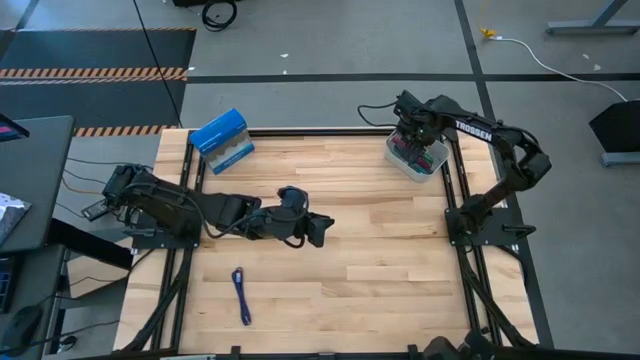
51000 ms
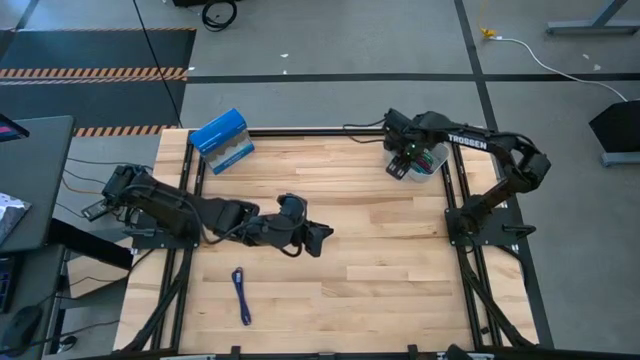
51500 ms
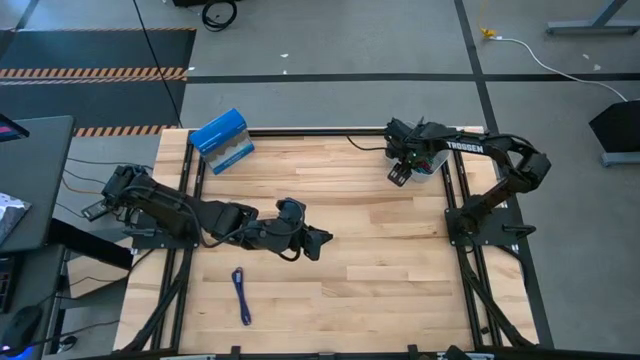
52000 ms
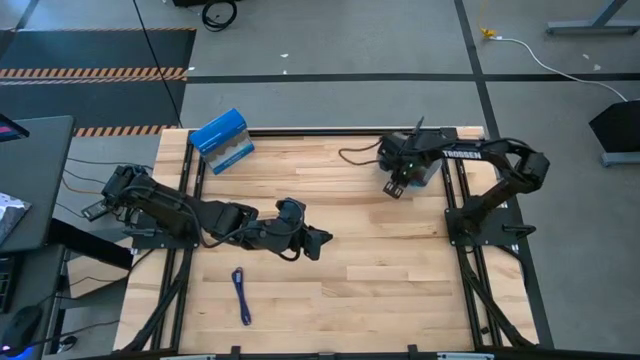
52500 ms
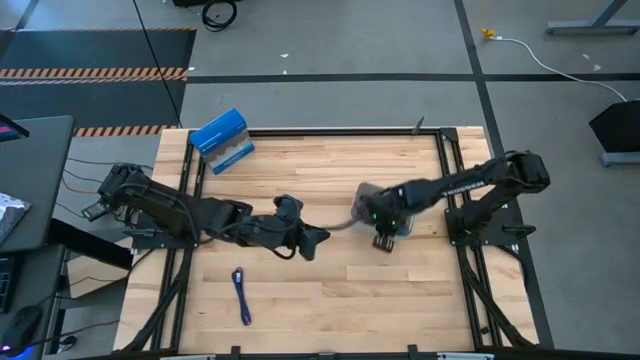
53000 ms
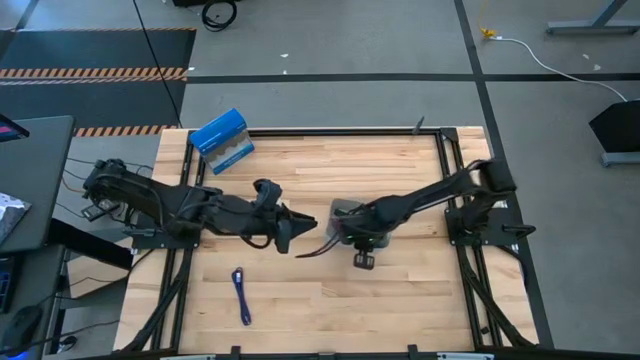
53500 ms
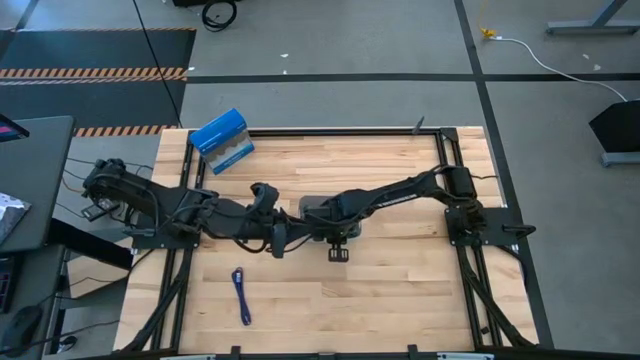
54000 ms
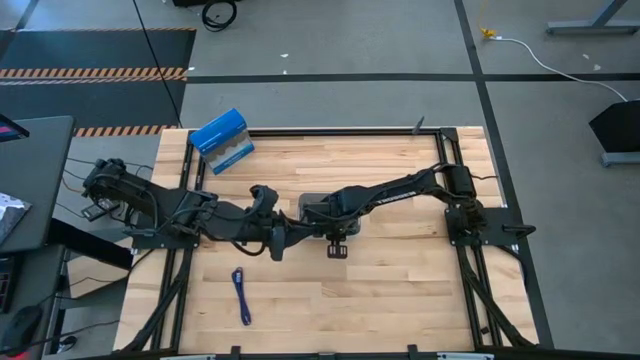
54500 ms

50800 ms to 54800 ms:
Task: Pick and place USB-C Cables
Move the bin to the center of the table

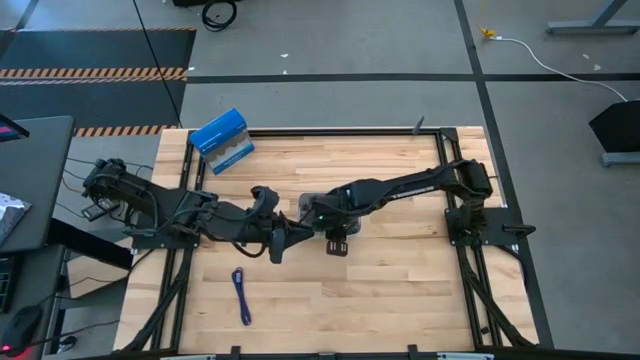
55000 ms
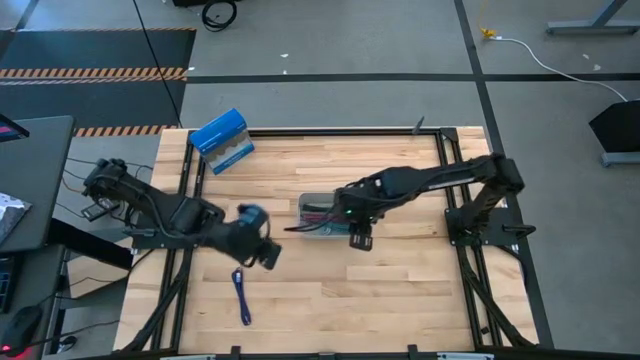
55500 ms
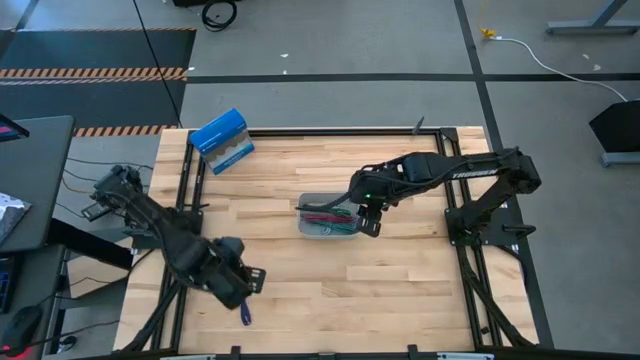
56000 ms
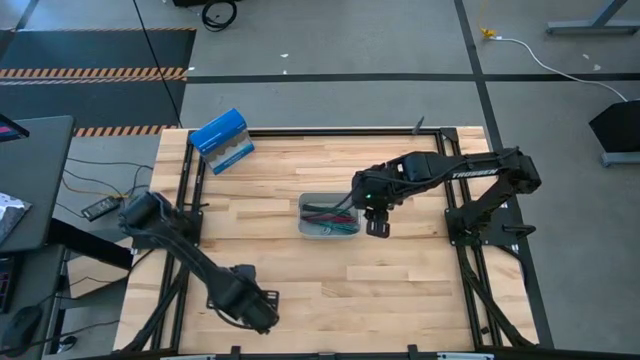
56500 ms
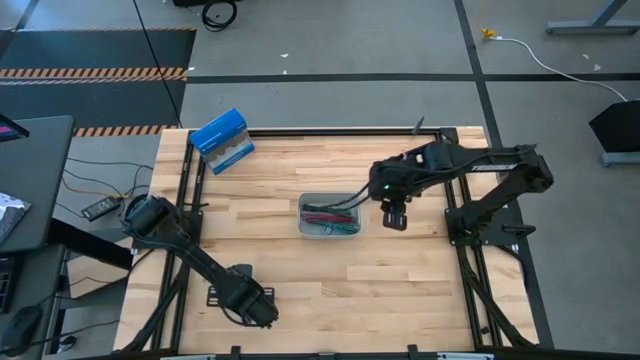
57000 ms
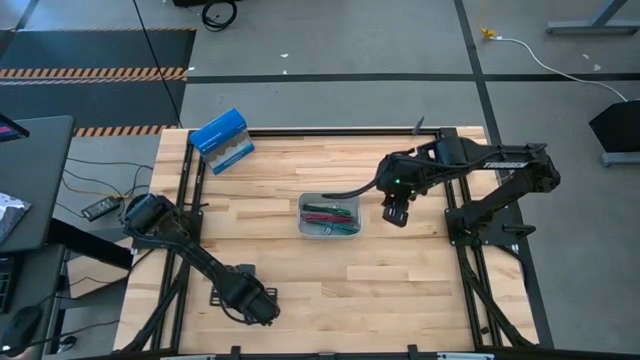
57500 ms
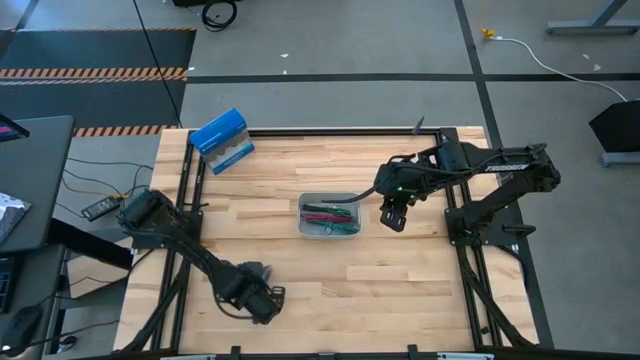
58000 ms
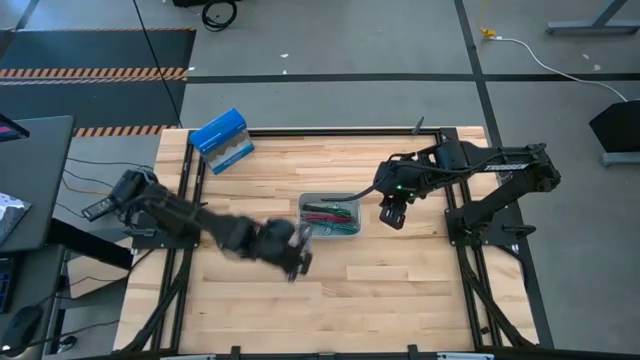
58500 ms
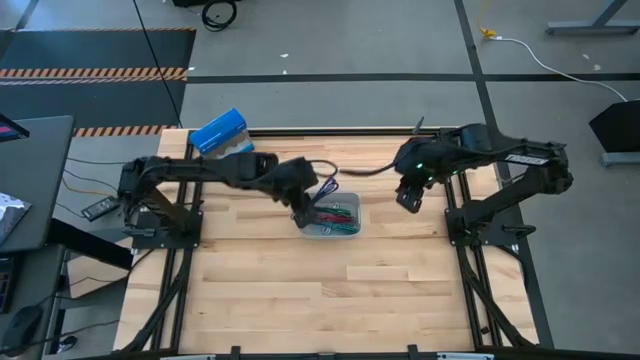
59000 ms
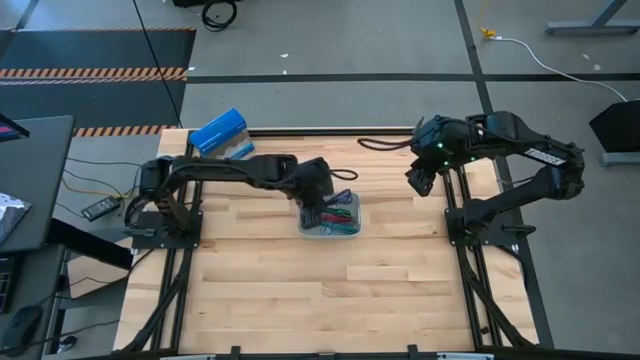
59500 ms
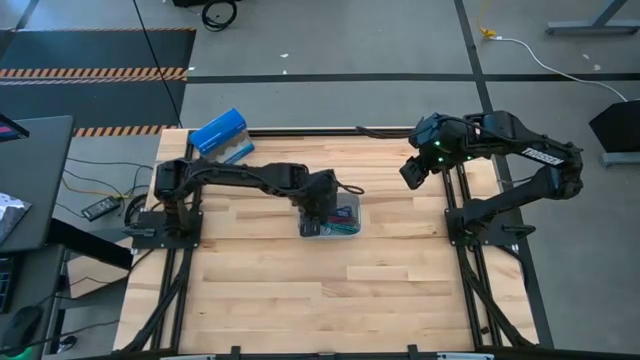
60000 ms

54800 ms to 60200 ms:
Put the ziptied dark blue USB charger cable into the bin

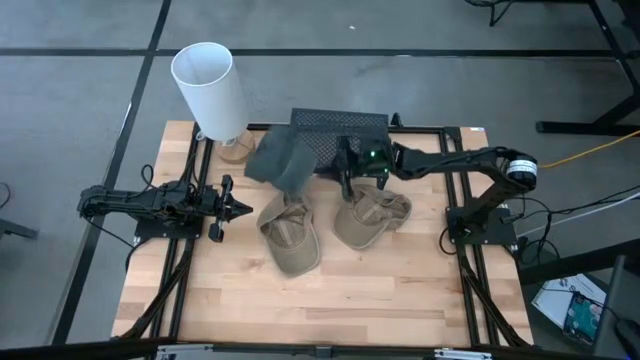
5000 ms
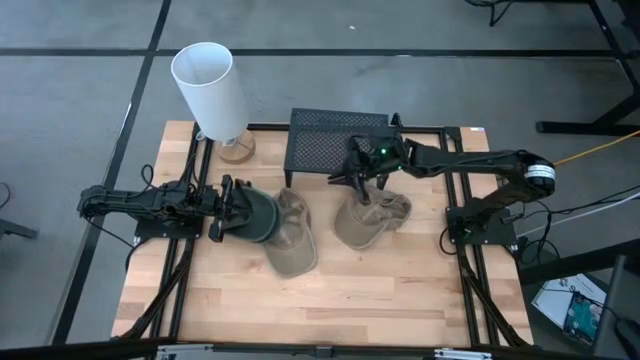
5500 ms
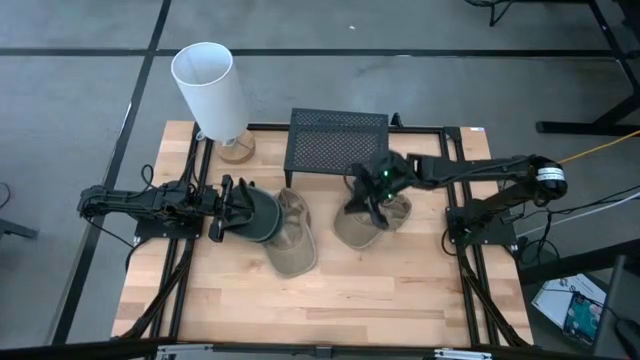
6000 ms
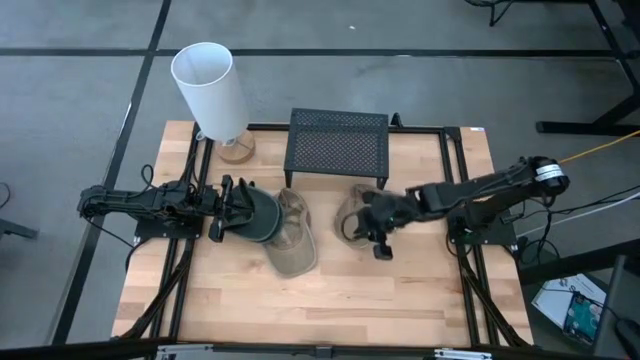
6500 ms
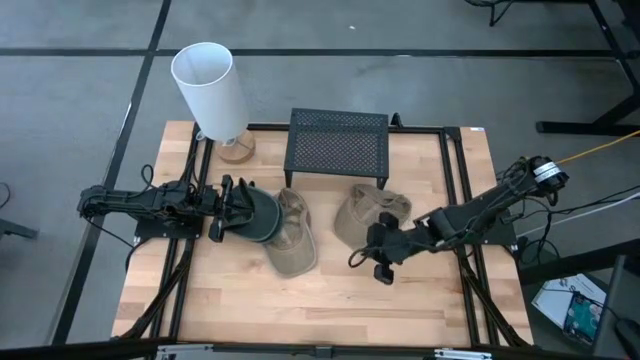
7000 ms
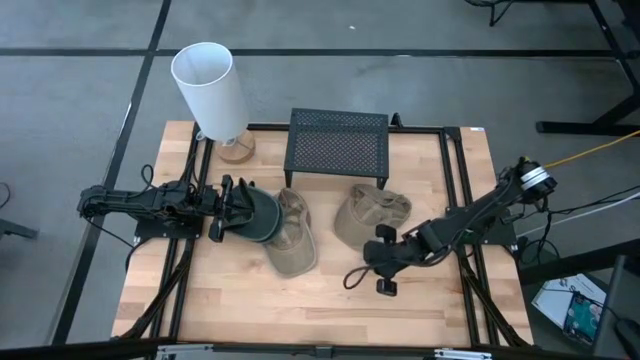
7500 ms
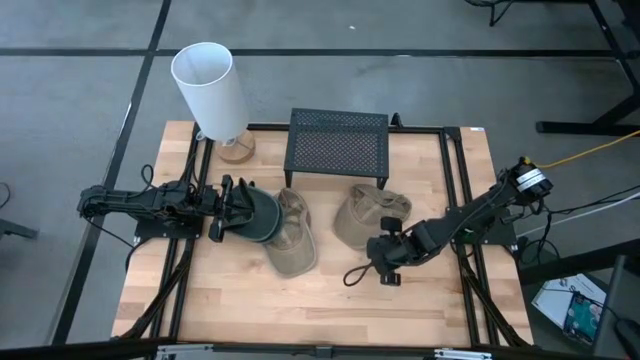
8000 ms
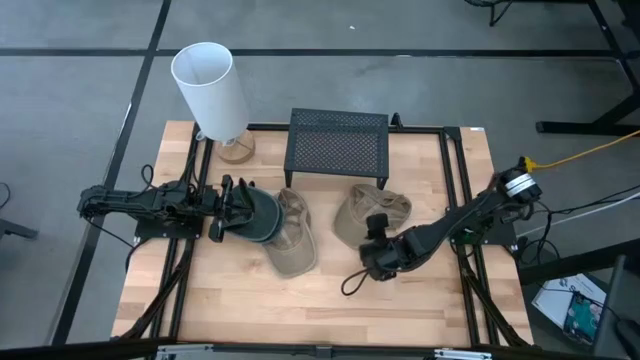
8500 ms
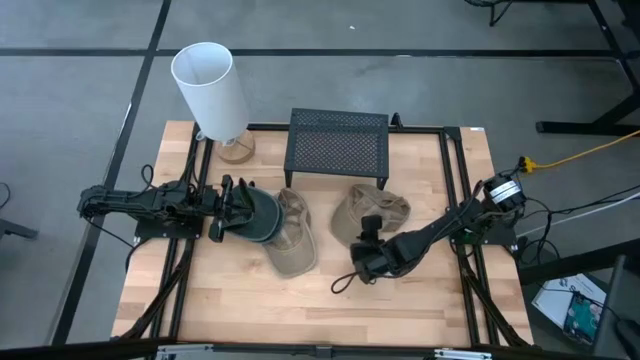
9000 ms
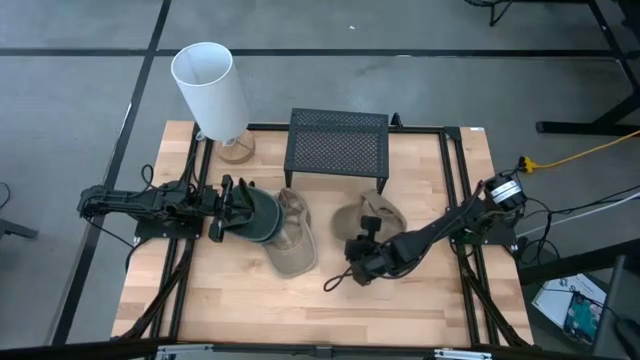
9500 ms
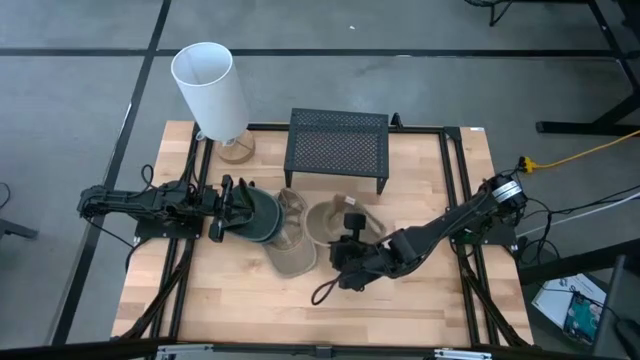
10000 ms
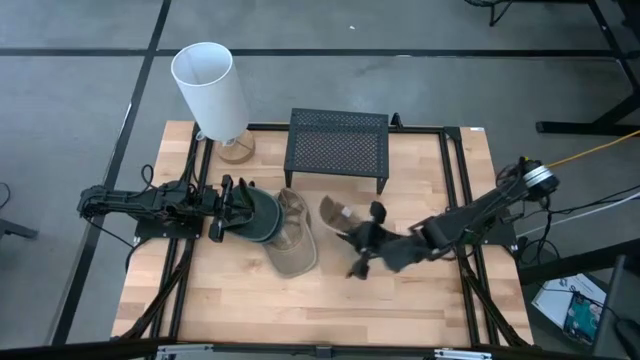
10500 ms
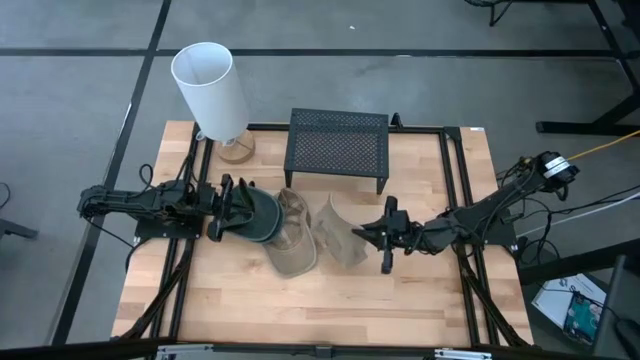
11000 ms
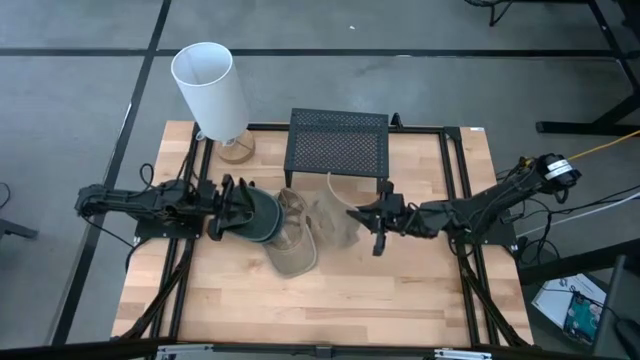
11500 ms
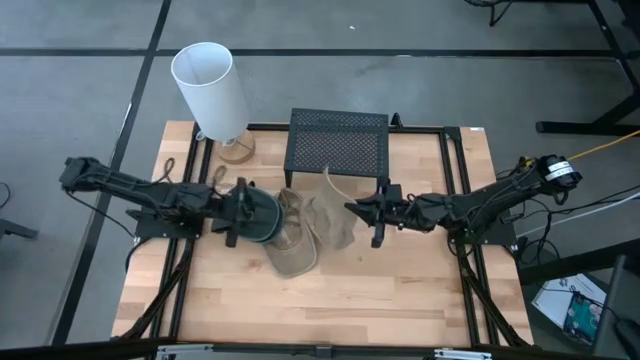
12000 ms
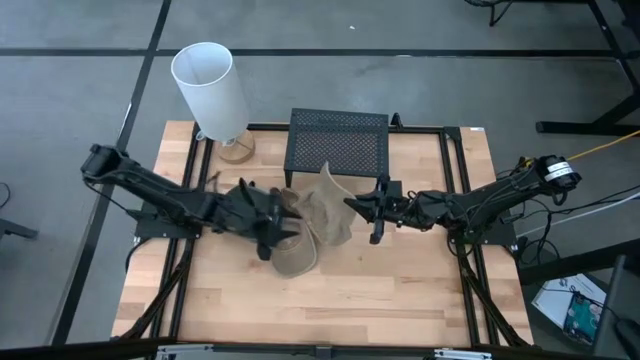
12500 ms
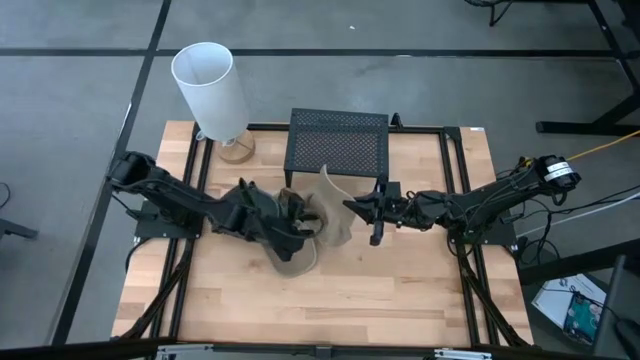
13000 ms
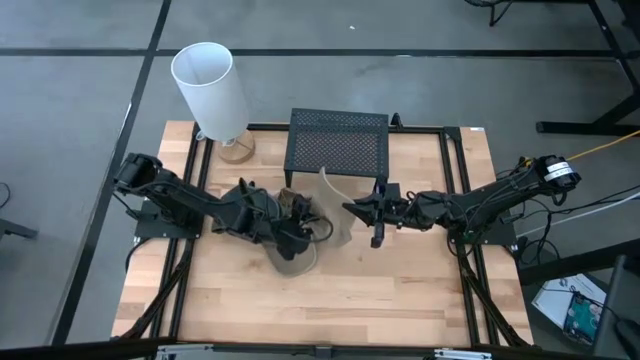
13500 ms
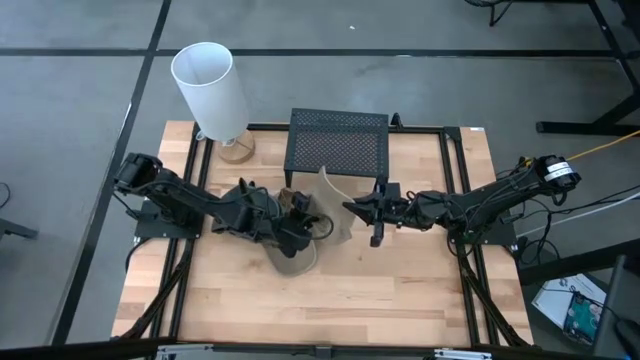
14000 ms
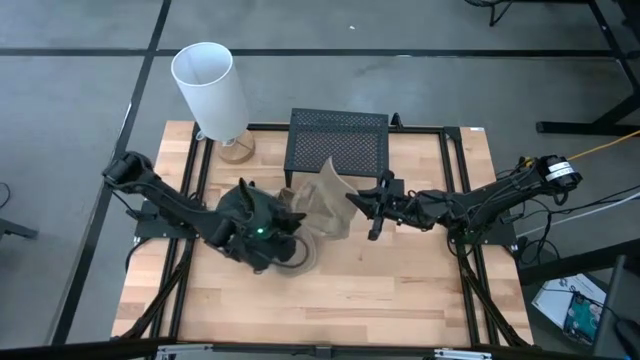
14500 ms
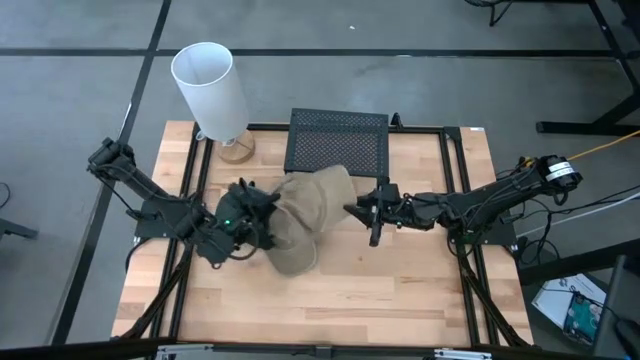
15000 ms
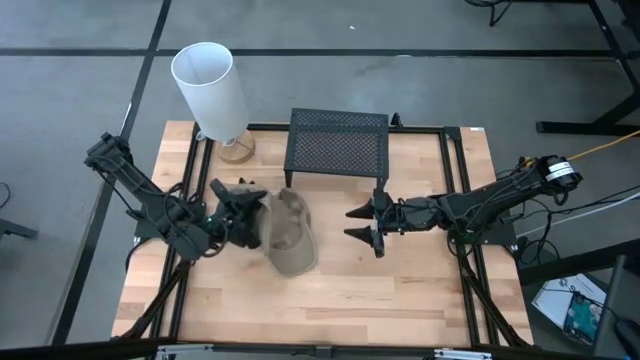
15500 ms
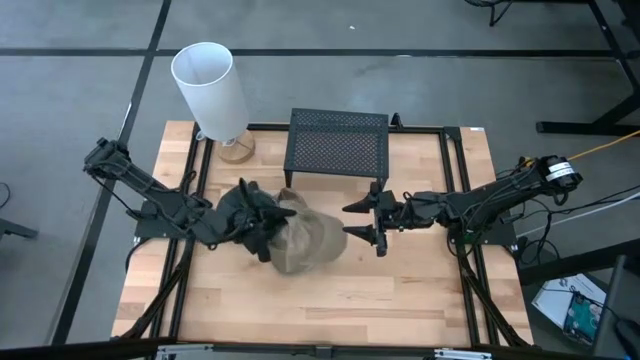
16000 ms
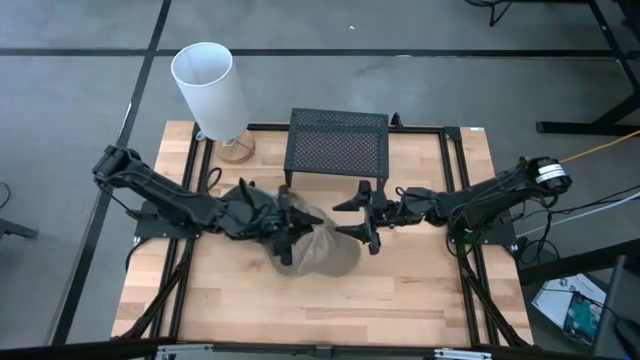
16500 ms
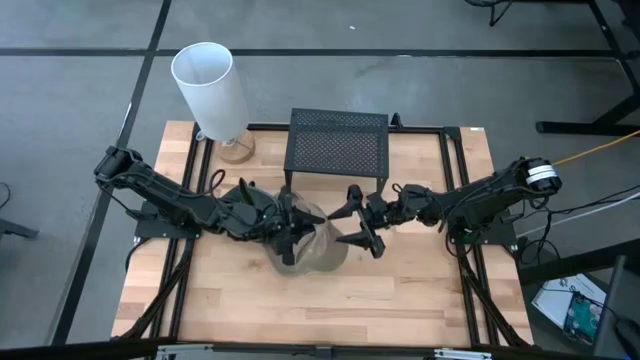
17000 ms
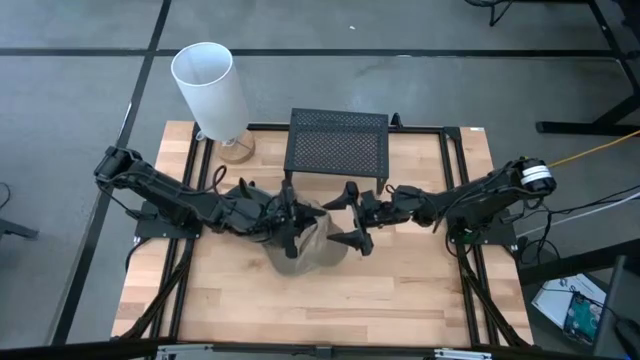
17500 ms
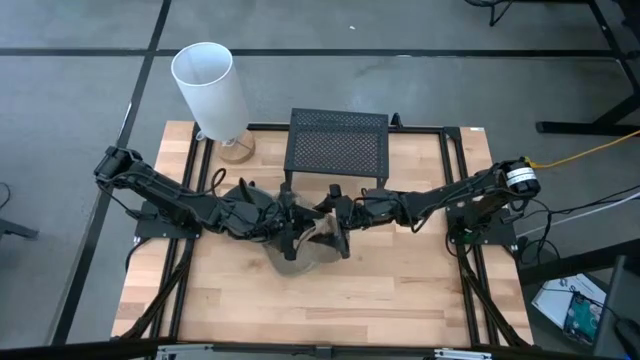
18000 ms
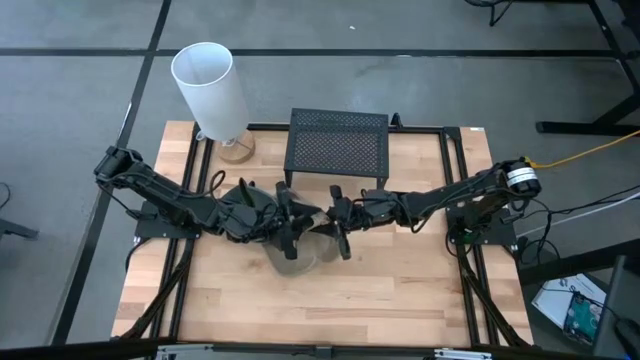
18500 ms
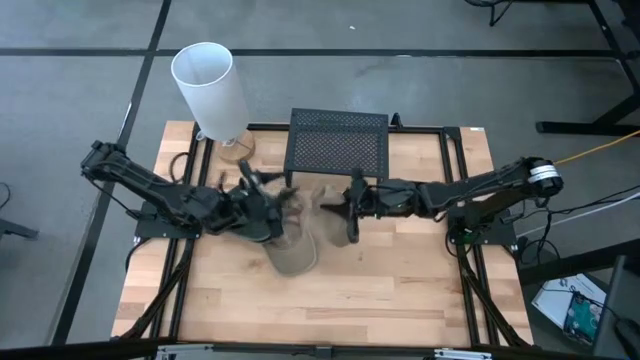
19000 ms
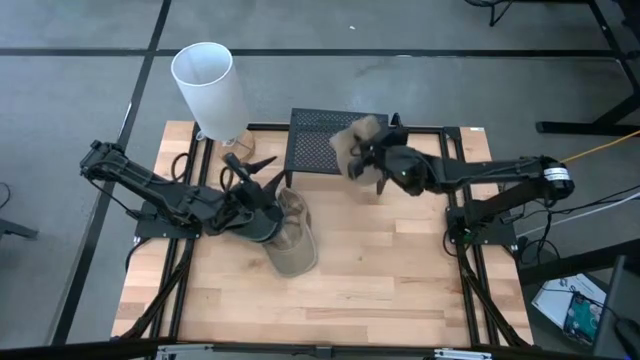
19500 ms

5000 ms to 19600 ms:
Task: Pick & Place hat
Put the right brown cap on the shelf
